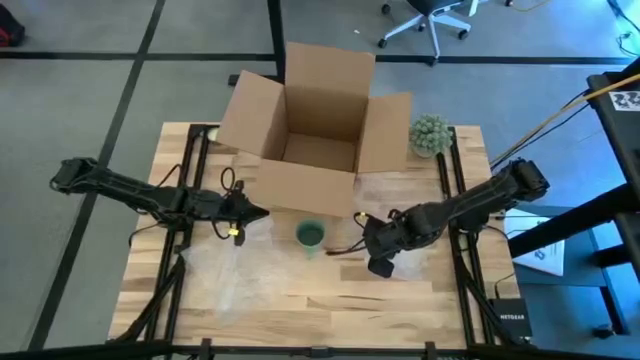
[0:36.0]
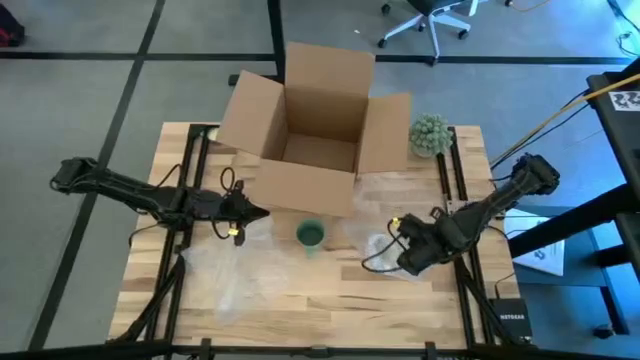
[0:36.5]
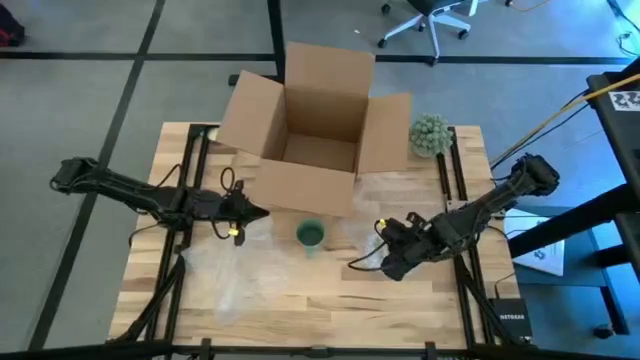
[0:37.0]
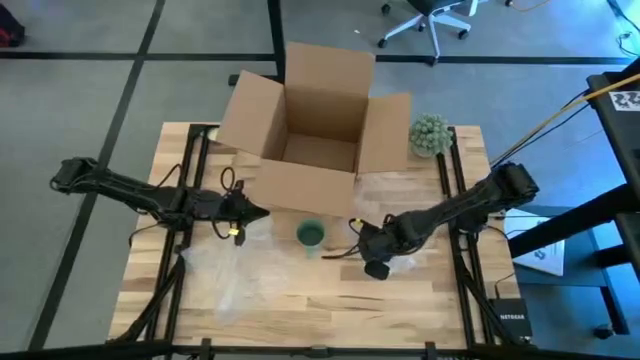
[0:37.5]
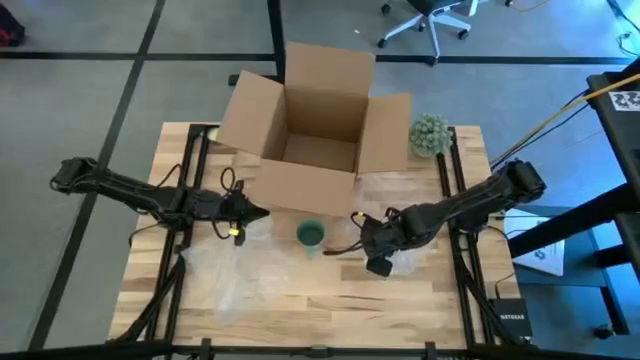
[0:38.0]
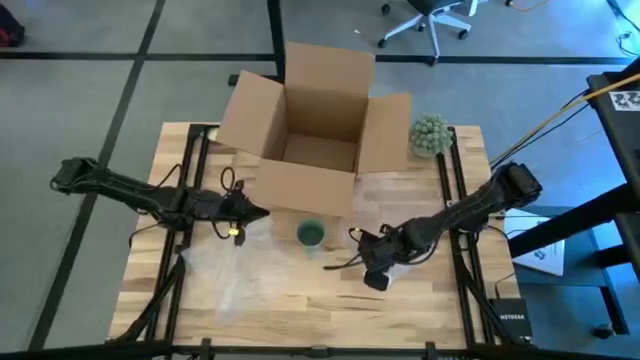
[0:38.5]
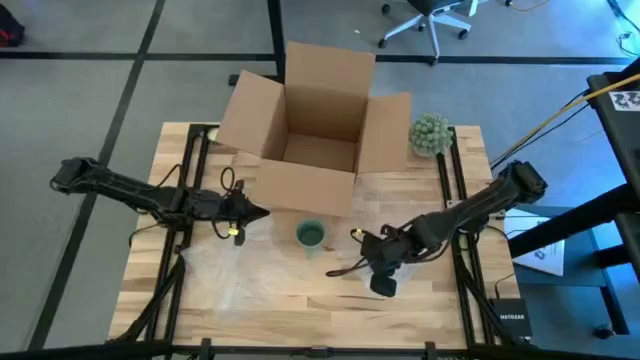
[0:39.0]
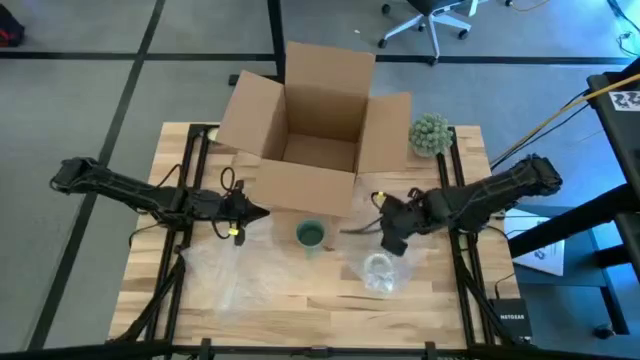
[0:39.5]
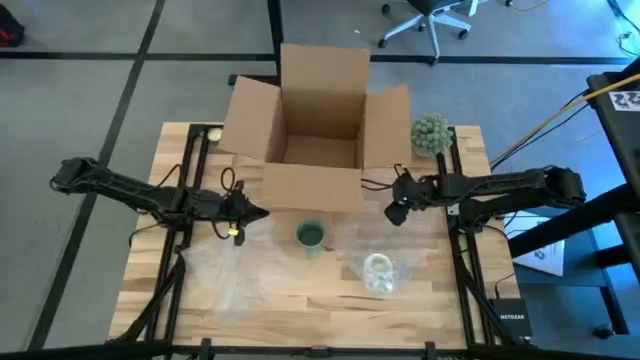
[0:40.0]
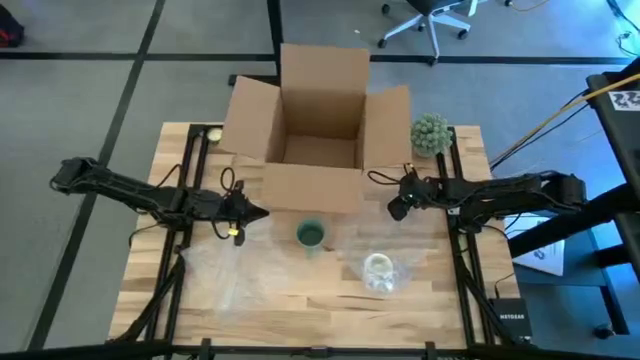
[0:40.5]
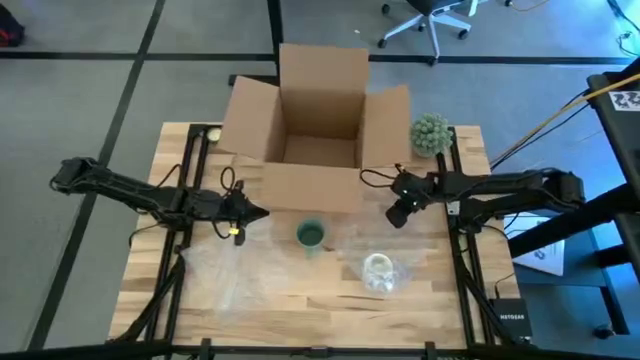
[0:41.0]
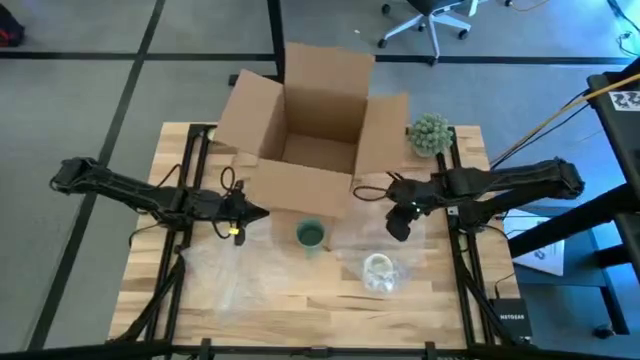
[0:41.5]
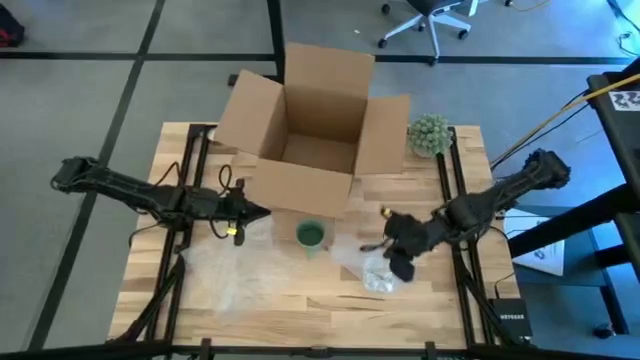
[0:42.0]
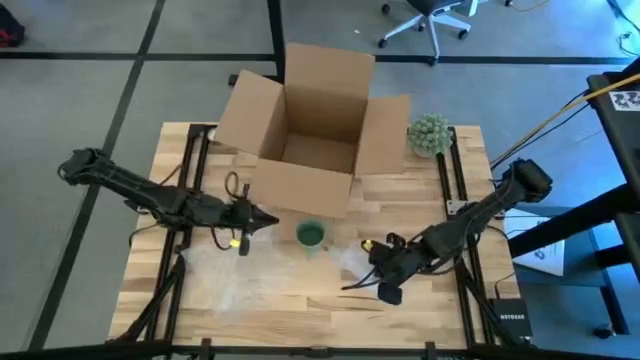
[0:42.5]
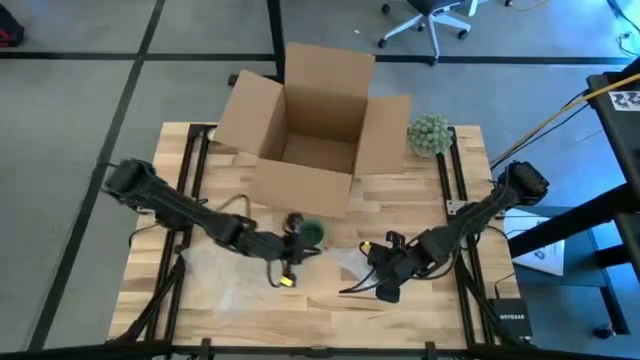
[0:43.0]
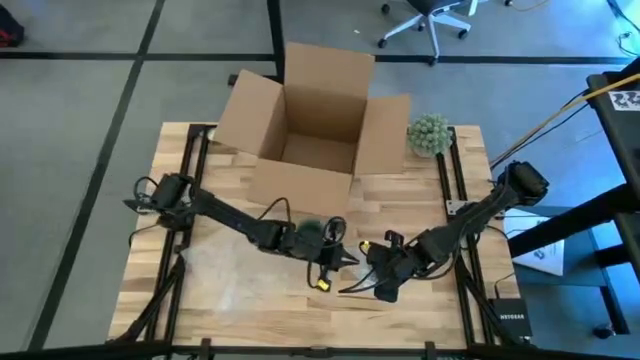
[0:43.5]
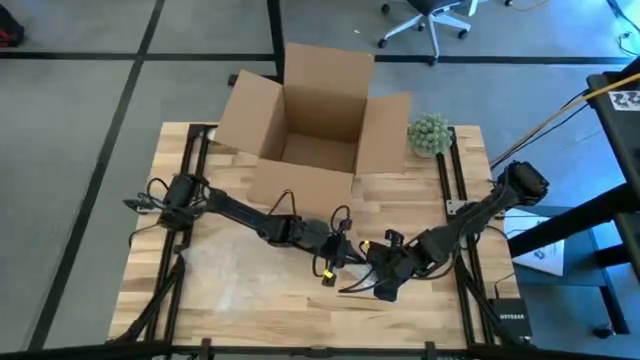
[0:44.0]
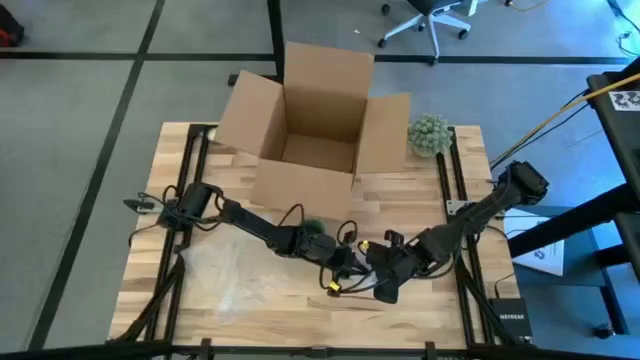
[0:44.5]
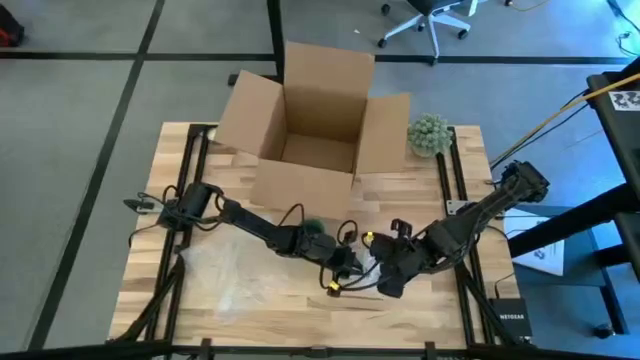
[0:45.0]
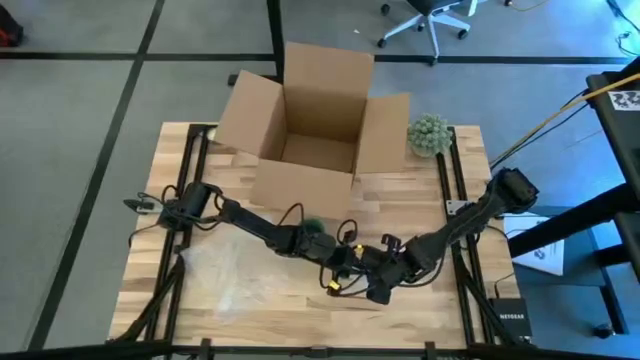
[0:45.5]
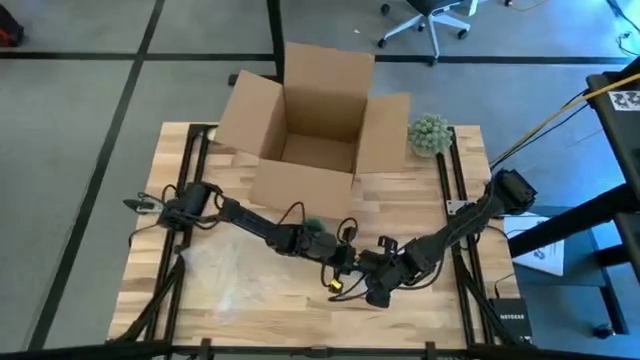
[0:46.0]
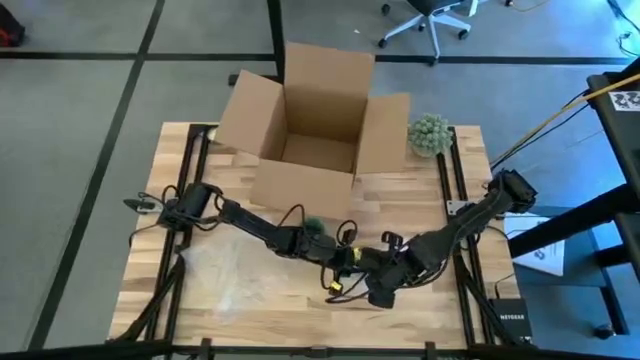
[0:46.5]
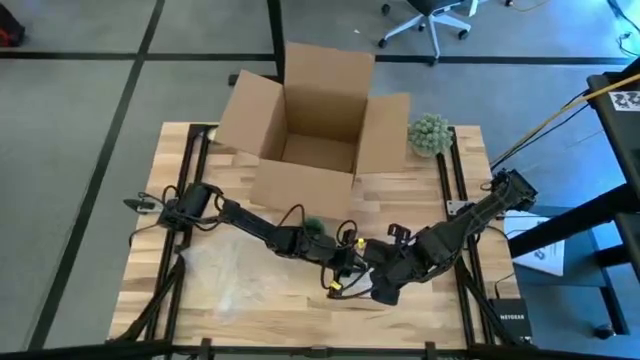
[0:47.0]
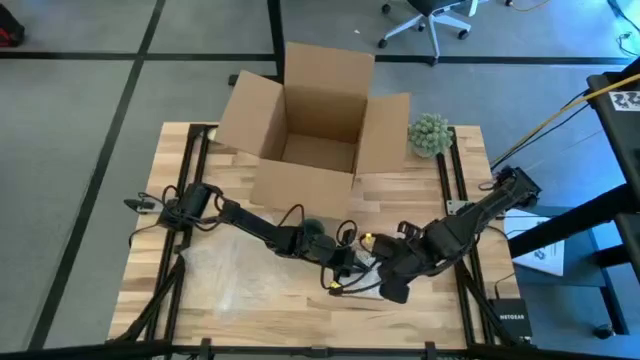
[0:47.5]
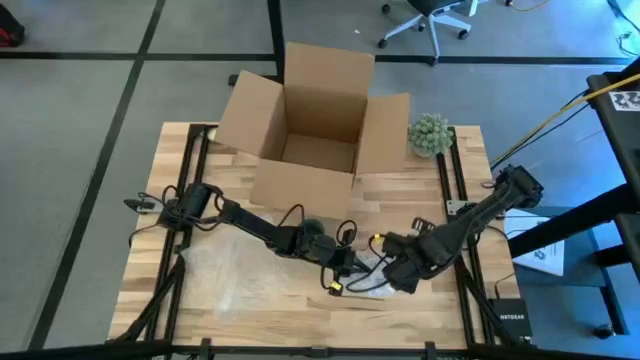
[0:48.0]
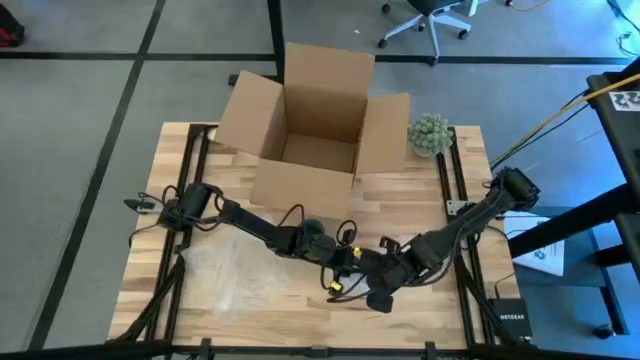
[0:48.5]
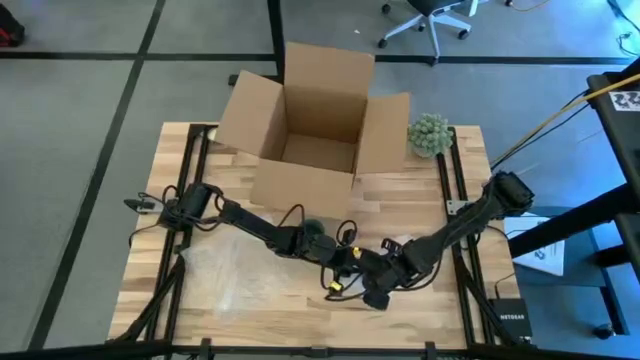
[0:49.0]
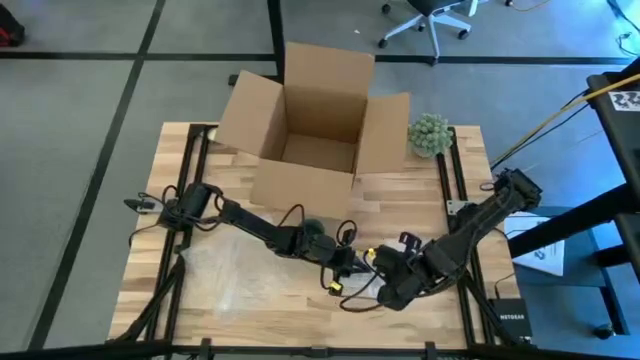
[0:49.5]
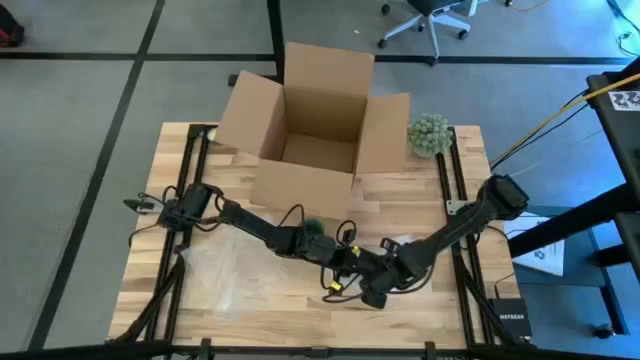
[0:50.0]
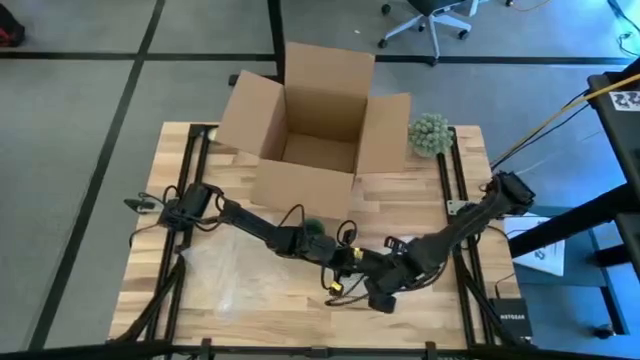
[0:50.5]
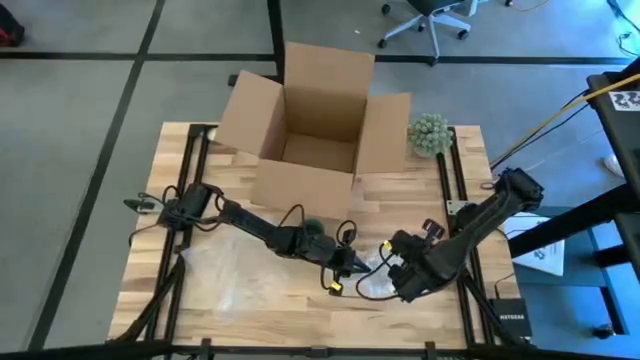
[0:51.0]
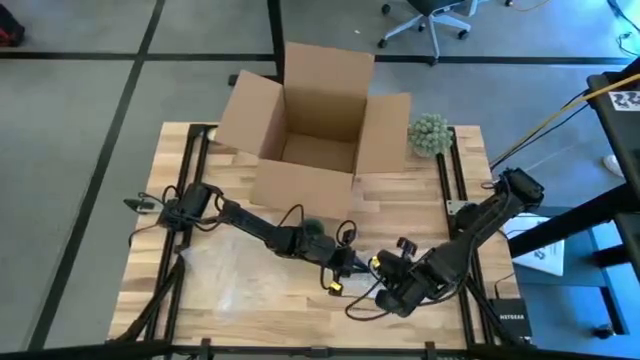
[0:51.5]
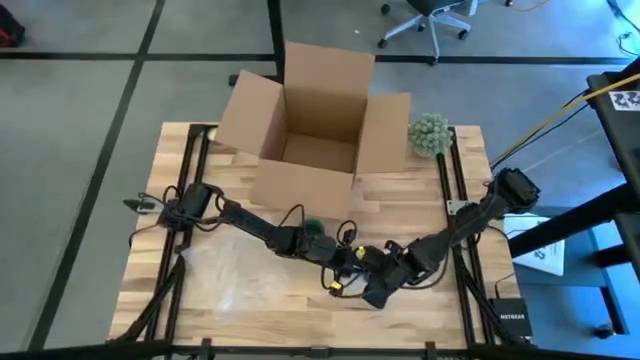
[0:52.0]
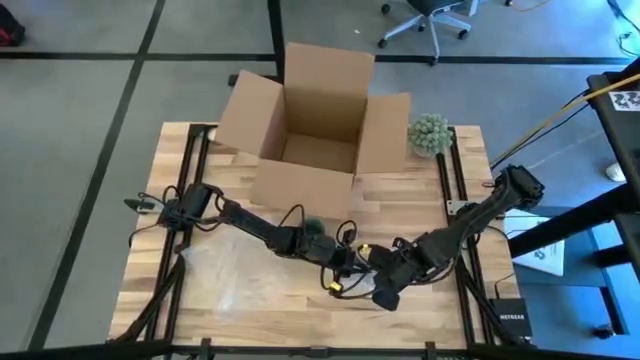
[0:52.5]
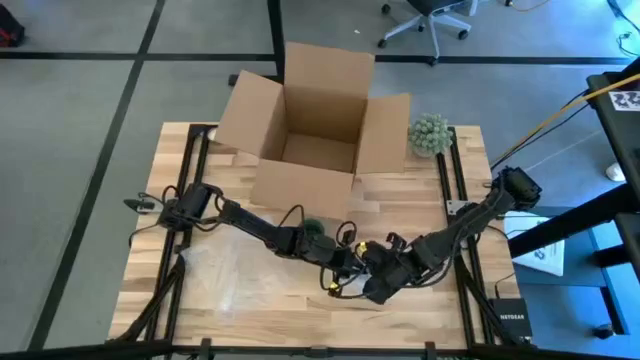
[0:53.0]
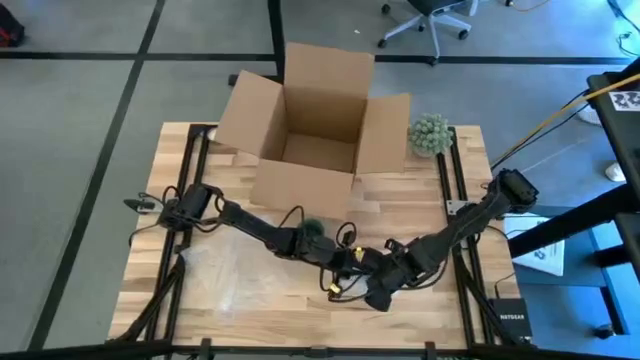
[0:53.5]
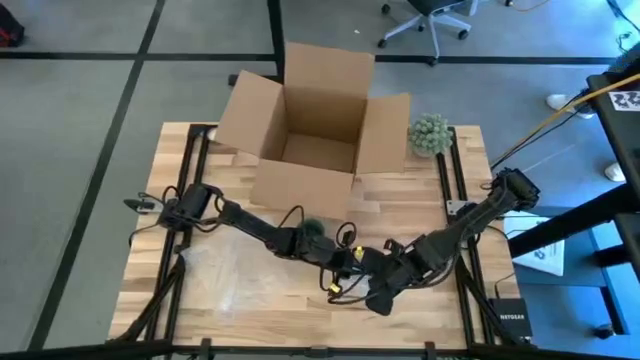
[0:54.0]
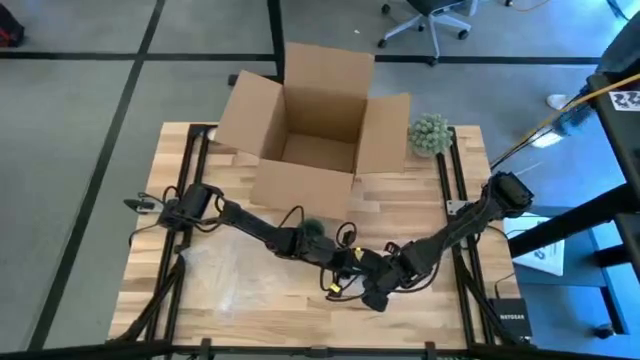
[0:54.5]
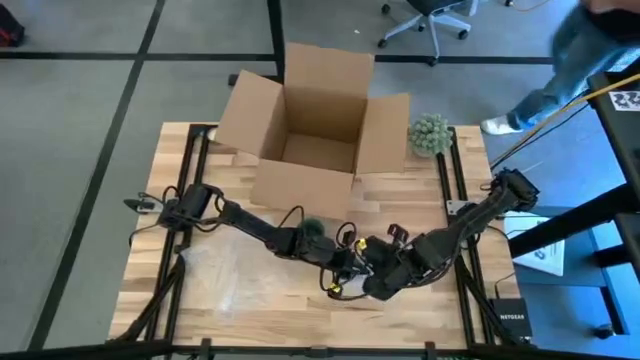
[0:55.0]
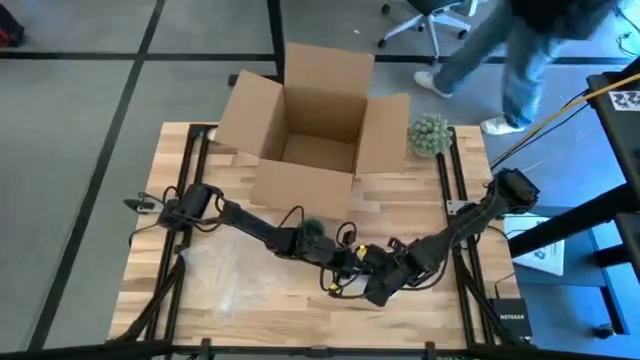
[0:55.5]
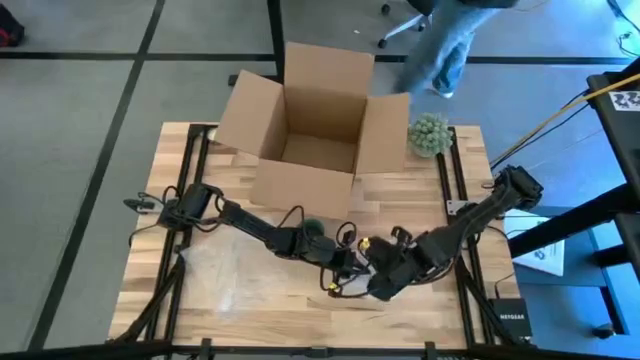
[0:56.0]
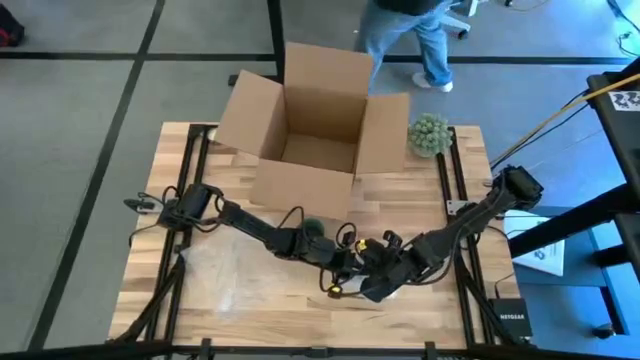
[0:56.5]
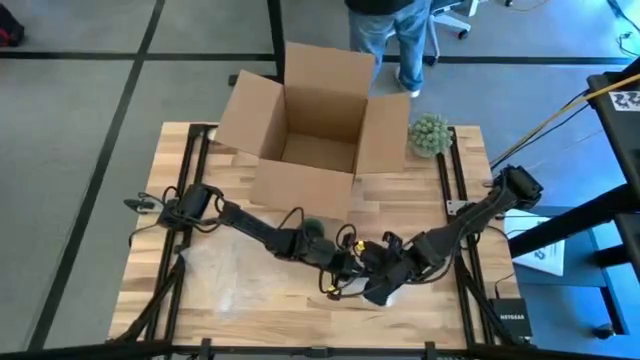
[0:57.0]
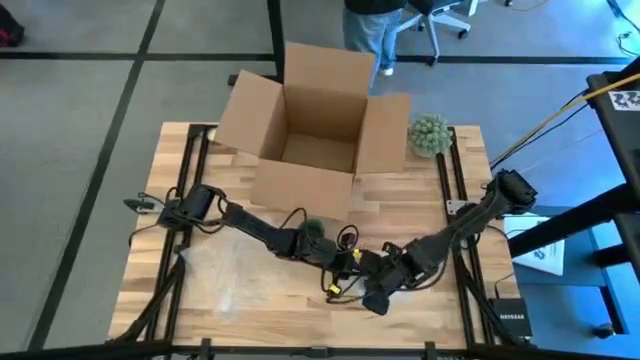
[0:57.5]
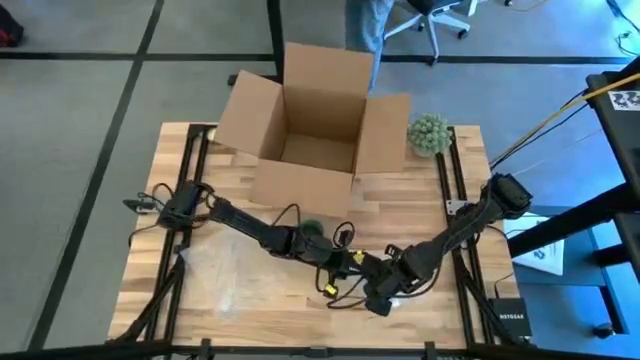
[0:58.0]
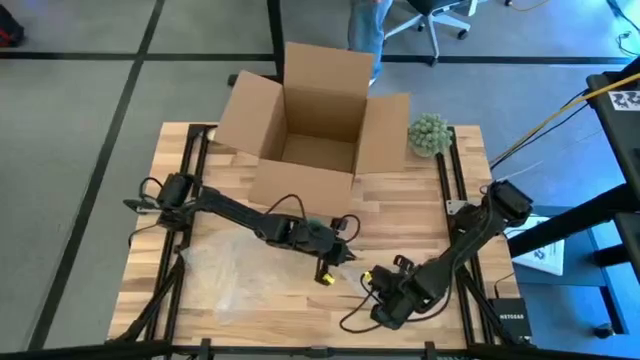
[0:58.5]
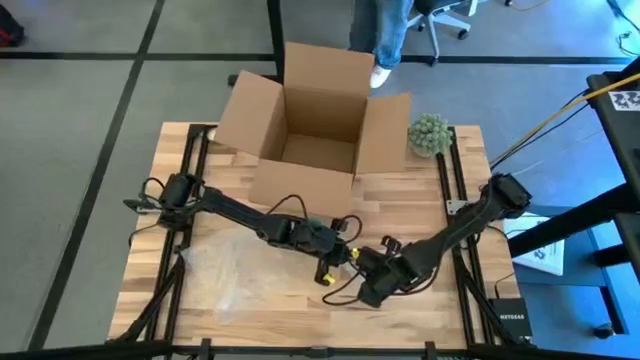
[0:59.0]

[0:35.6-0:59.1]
Task: wrap mug
Wrap the bottom white blue floral mug glass
